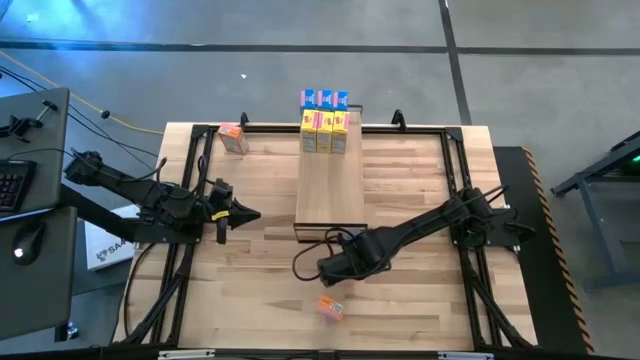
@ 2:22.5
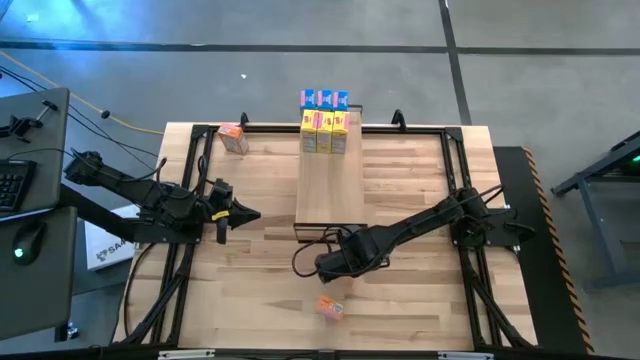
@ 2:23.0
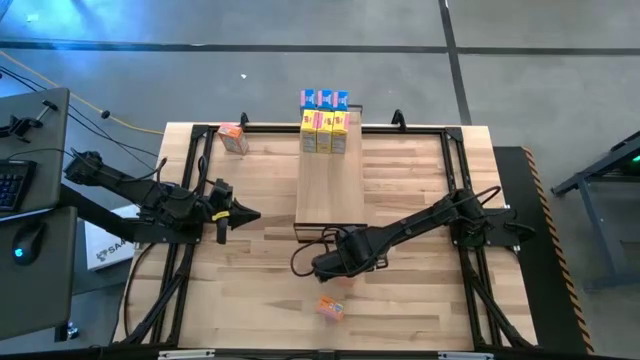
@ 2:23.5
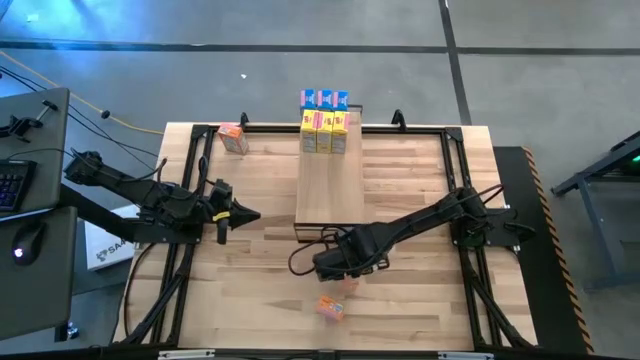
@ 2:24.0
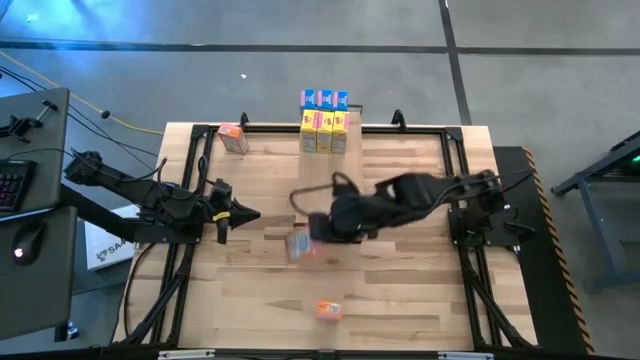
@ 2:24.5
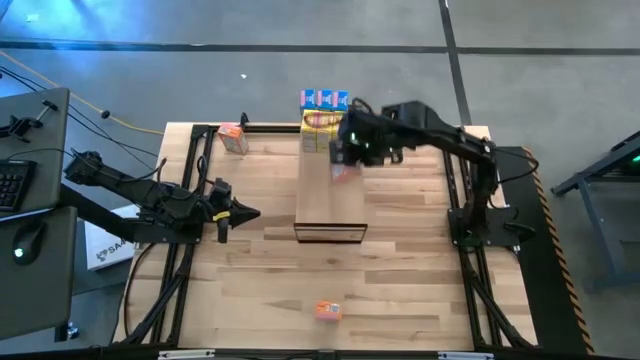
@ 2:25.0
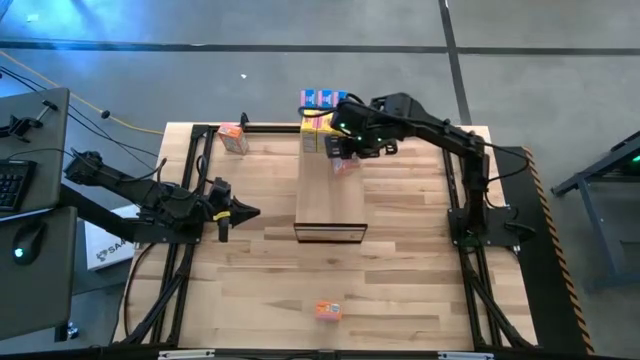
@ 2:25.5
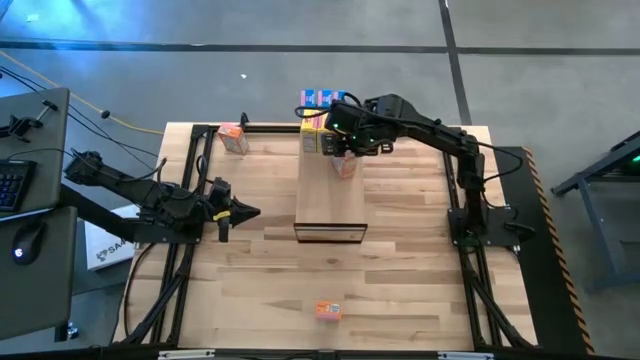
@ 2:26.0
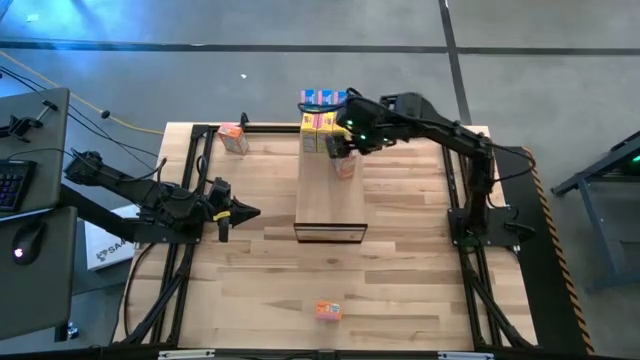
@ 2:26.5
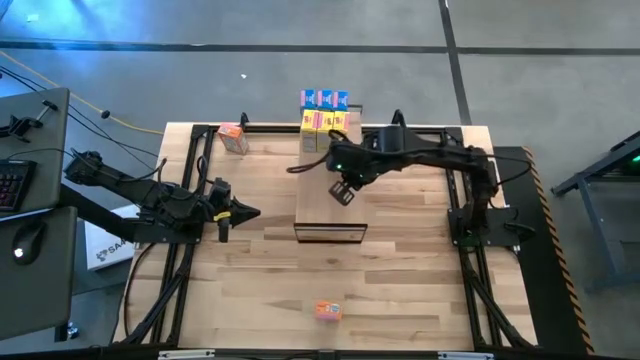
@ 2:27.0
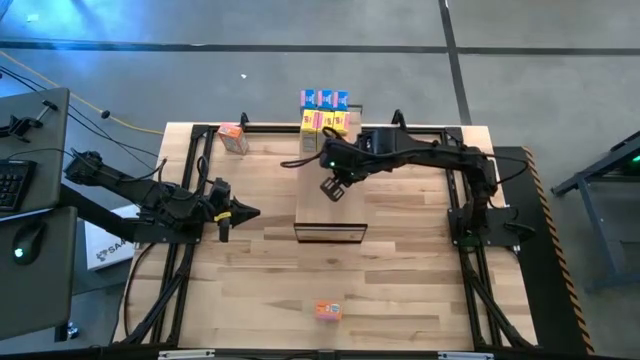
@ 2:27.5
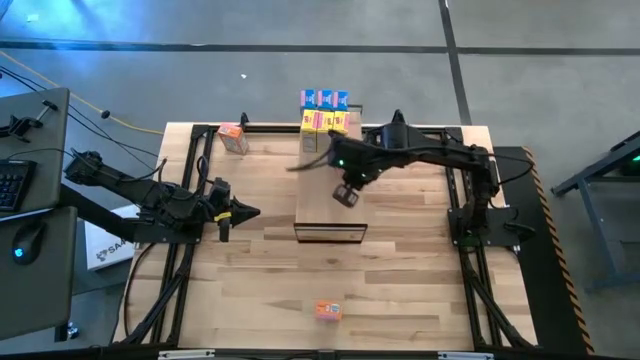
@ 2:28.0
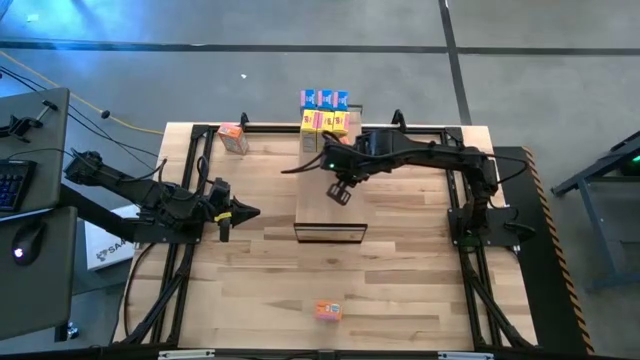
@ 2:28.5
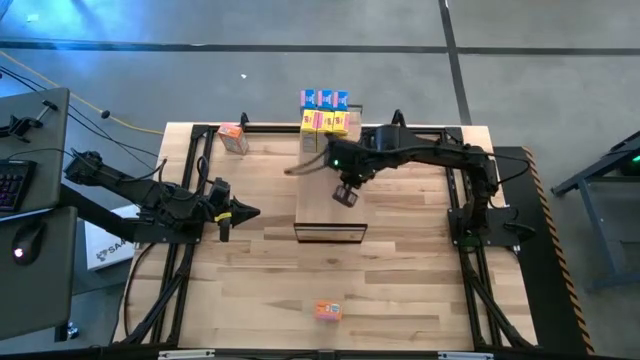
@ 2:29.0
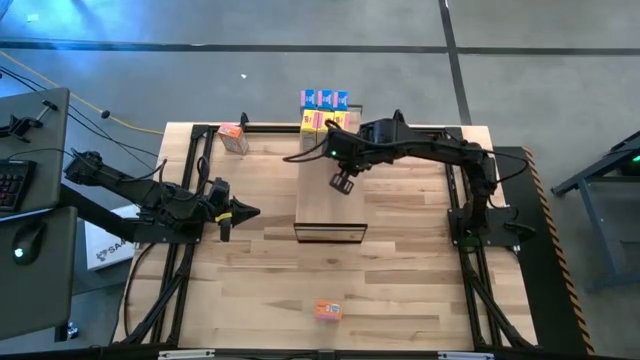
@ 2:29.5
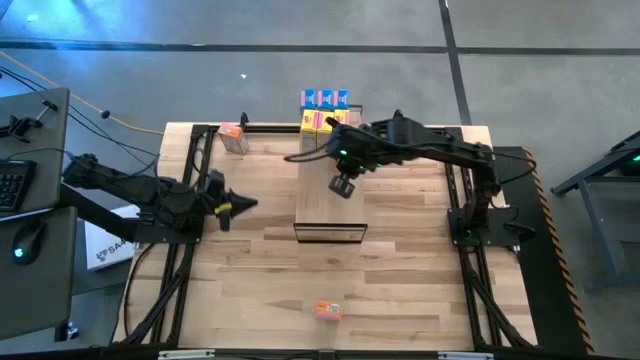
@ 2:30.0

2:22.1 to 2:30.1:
Task: Stack cereal on shelf
Put the bottom right orange cereal box on the shelf

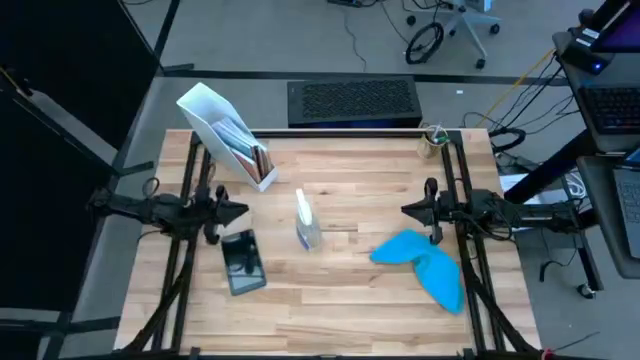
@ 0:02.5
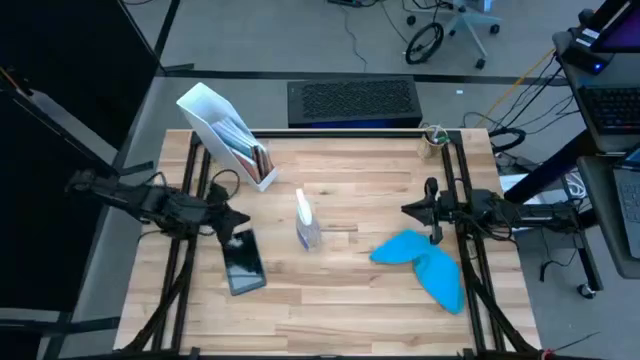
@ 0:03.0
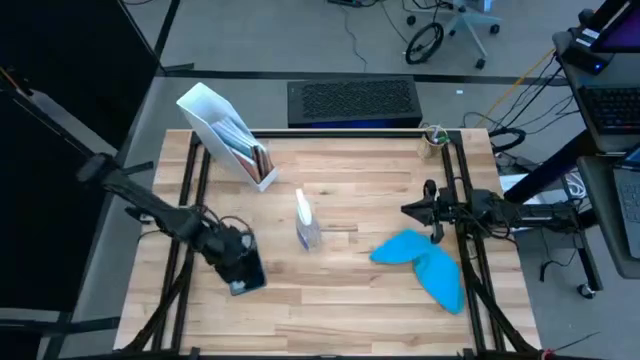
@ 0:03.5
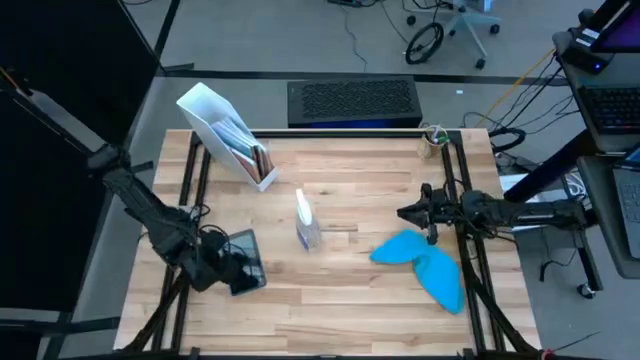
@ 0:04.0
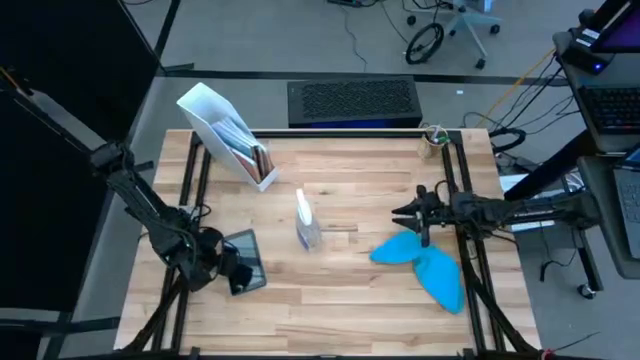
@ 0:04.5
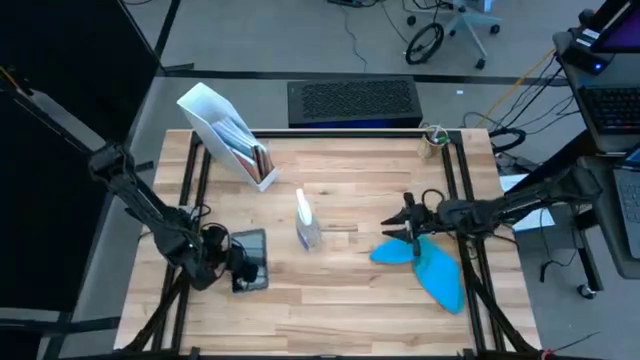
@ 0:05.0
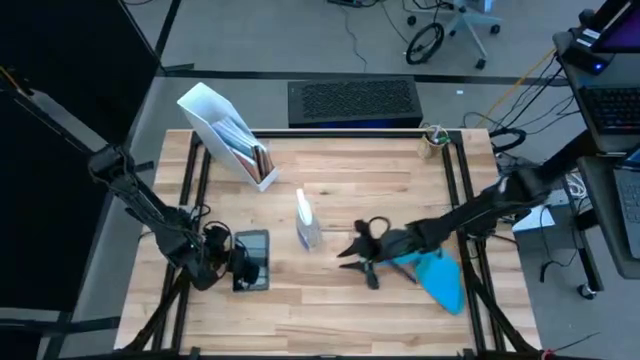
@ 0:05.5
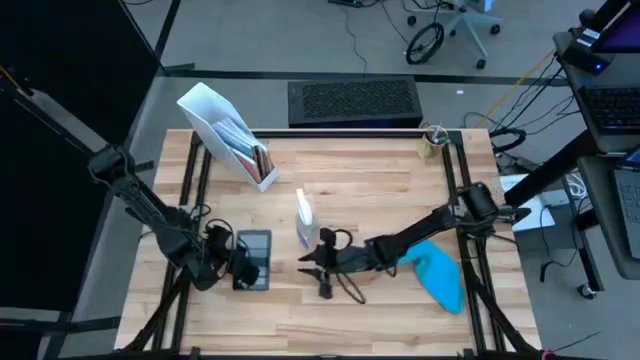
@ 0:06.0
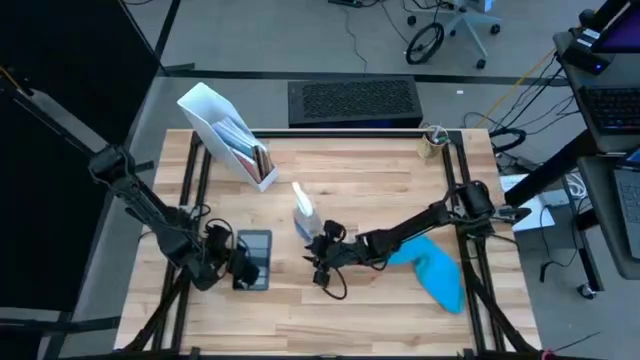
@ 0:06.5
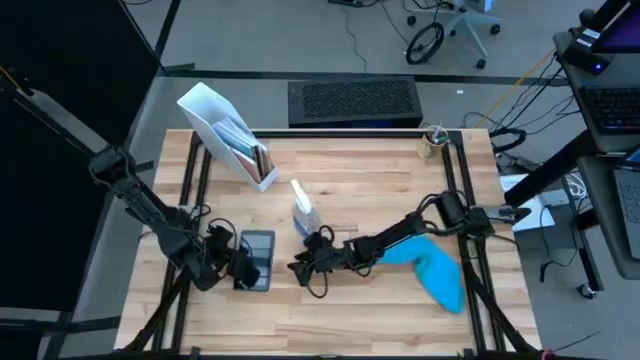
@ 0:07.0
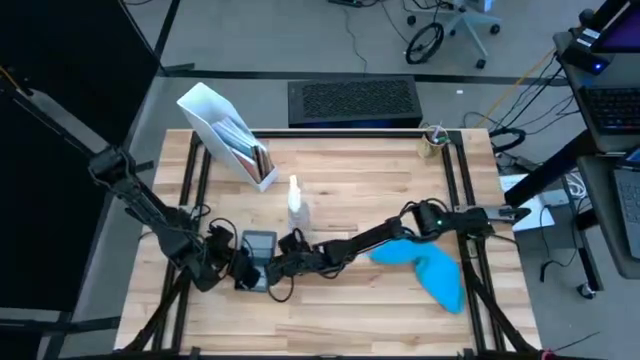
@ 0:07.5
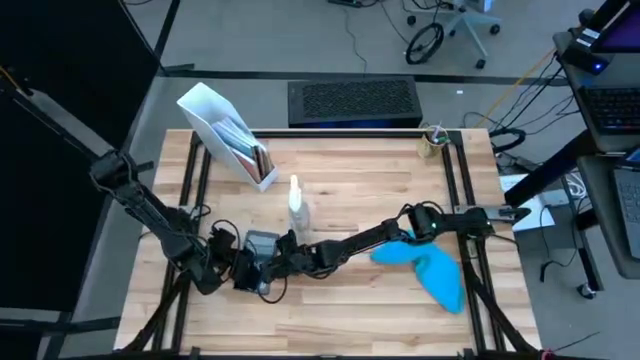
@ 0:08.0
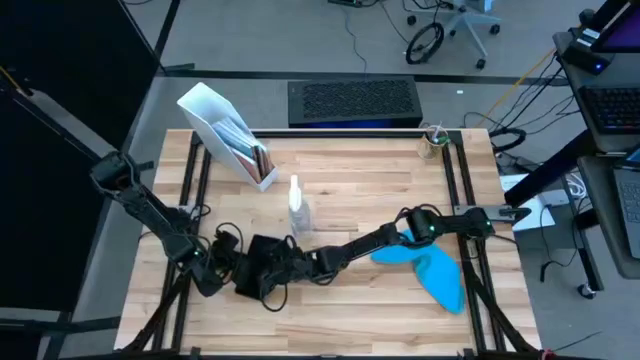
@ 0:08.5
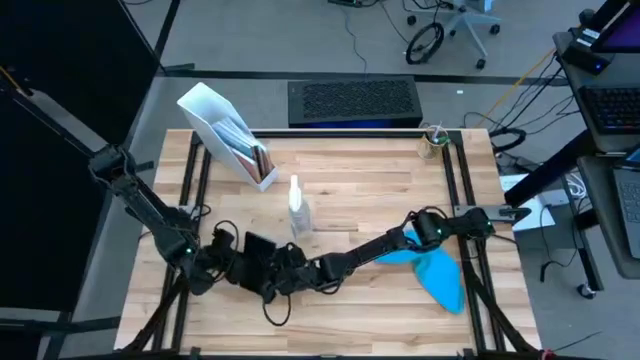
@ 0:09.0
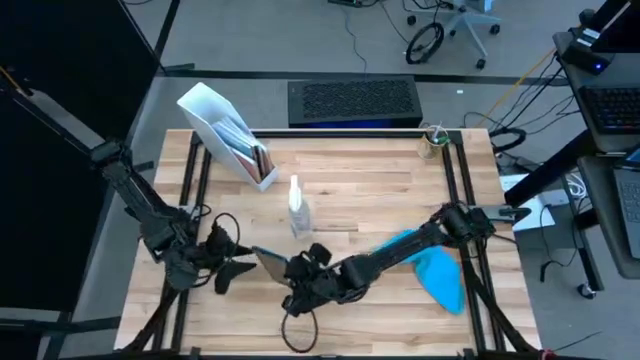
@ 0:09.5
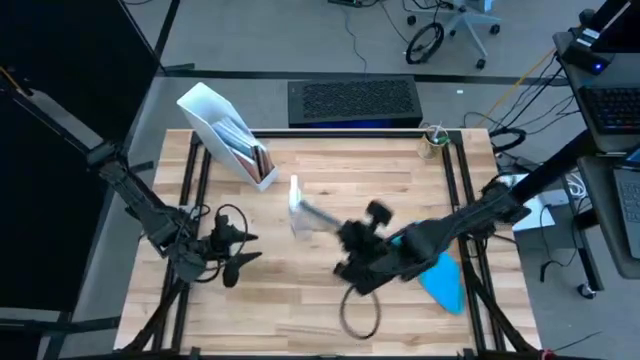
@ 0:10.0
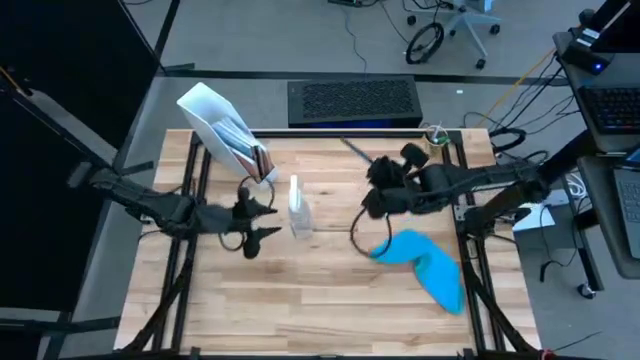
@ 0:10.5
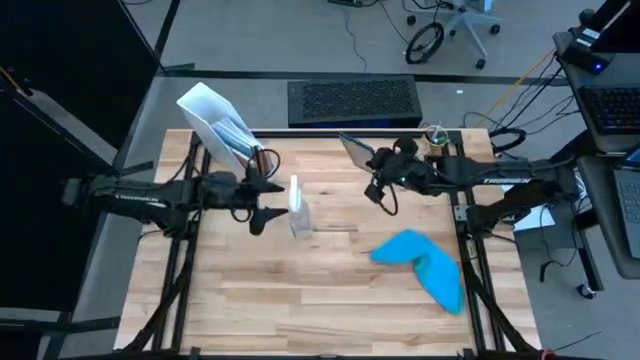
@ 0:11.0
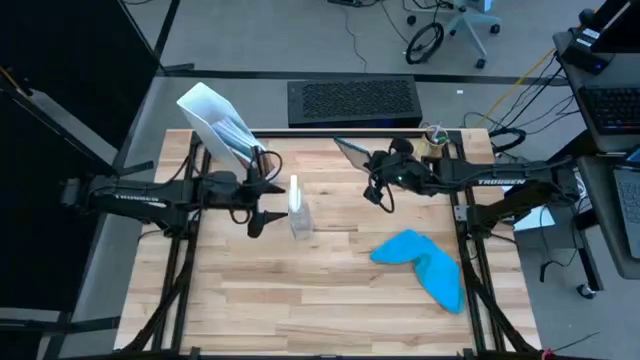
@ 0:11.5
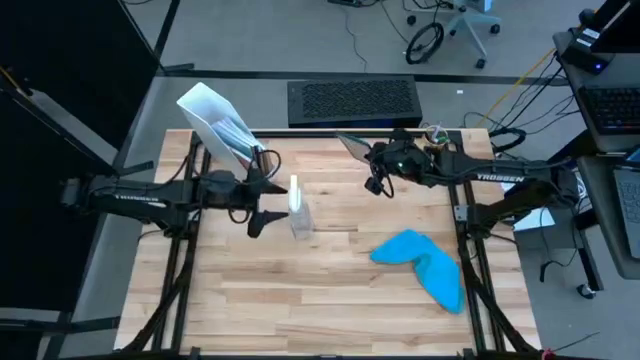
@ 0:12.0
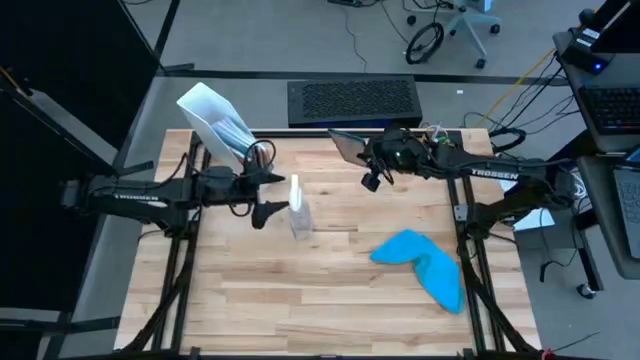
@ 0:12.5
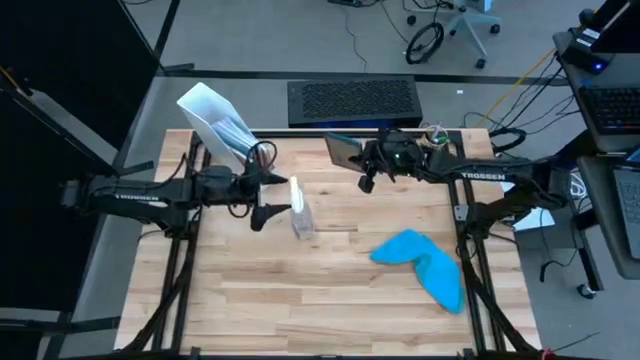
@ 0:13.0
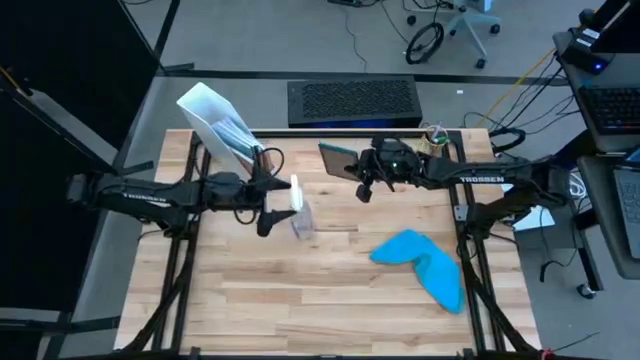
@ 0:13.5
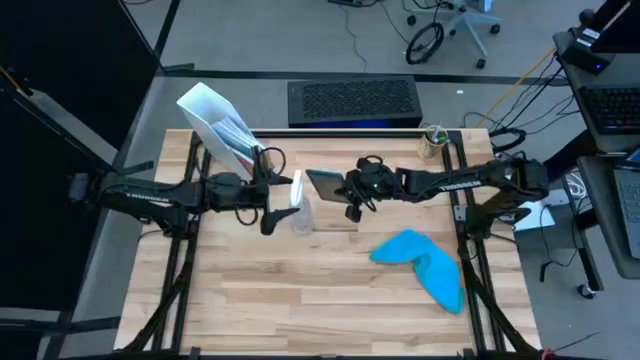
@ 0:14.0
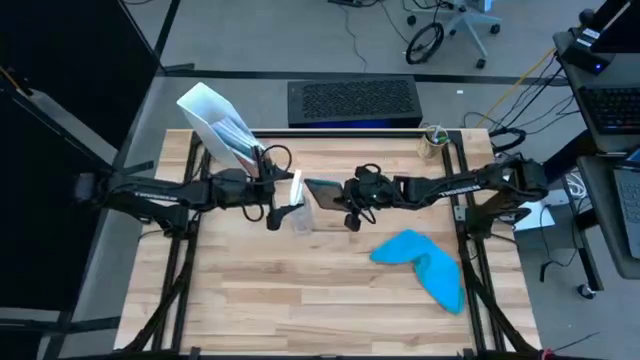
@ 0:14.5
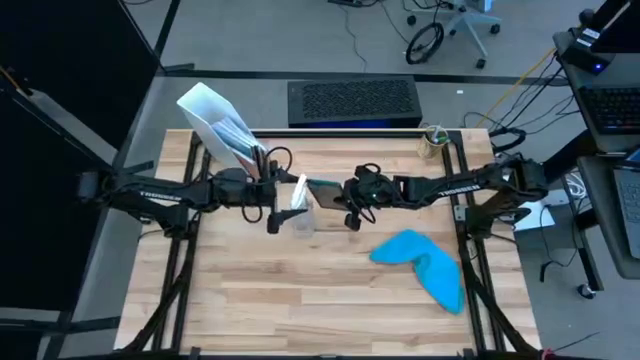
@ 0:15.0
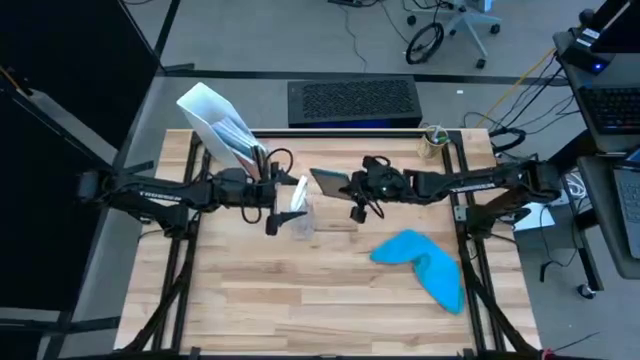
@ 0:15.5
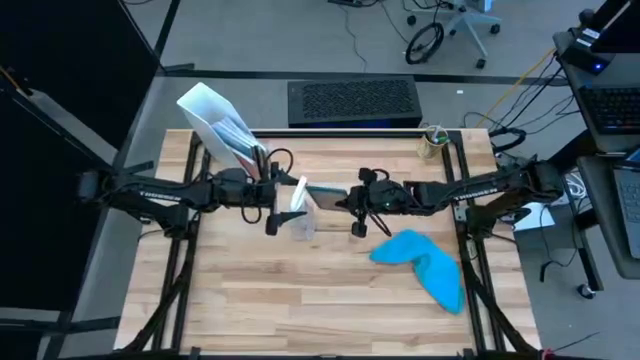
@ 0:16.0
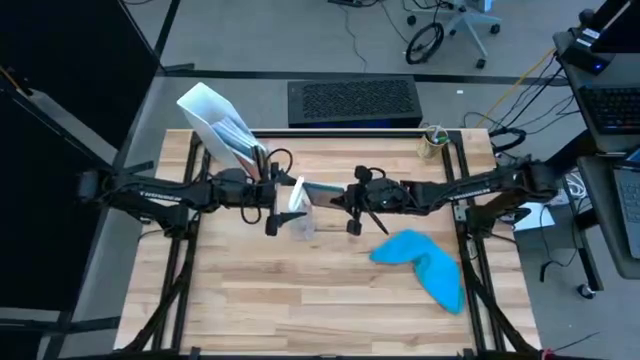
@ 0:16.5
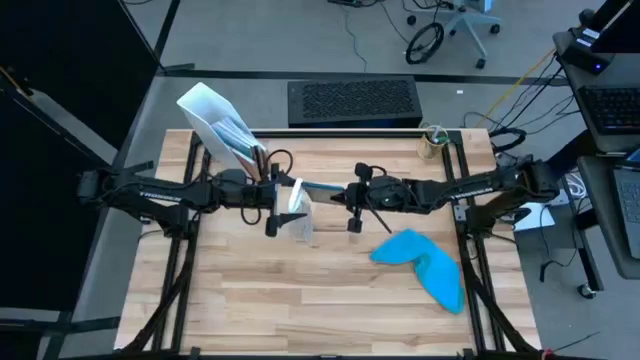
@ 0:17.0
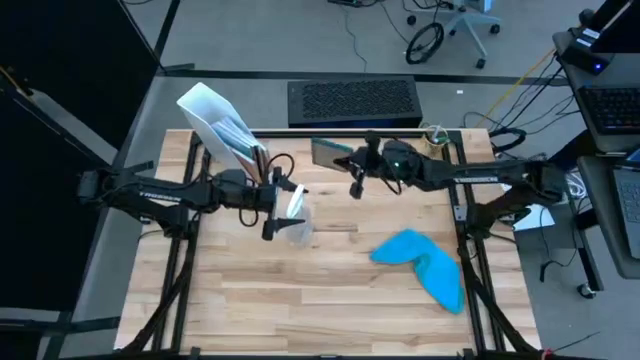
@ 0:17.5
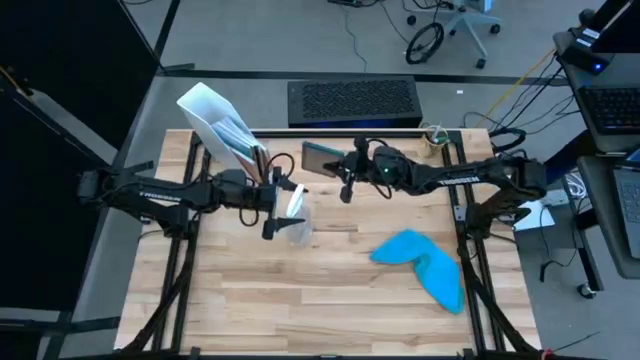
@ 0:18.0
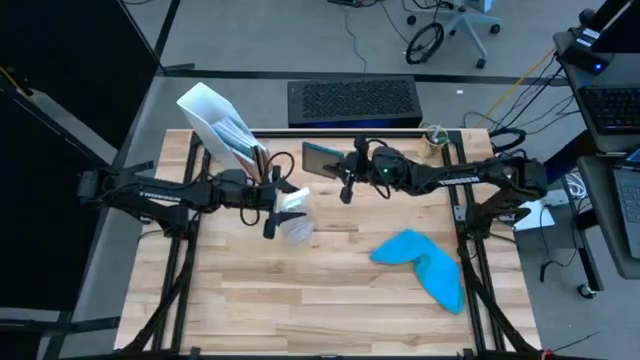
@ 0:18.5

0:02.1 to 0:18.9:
Task: Apply microfiber cloth
Spray the blue tablet using the spray bottle
